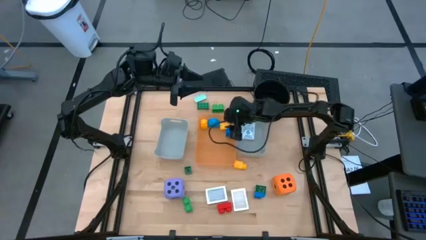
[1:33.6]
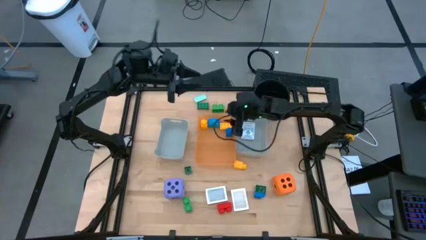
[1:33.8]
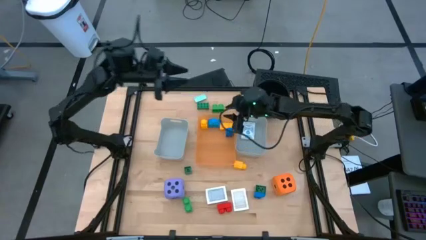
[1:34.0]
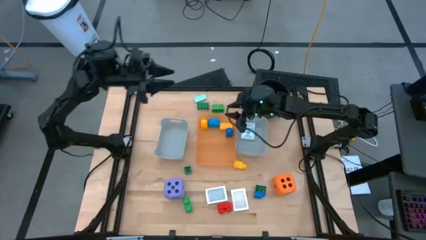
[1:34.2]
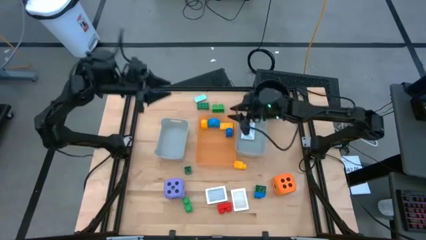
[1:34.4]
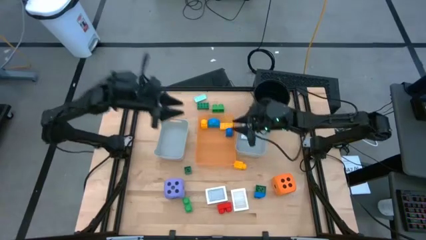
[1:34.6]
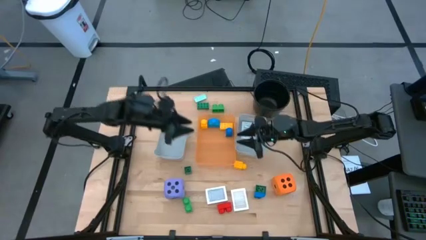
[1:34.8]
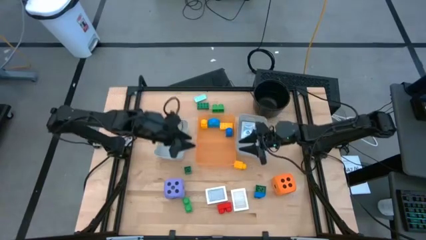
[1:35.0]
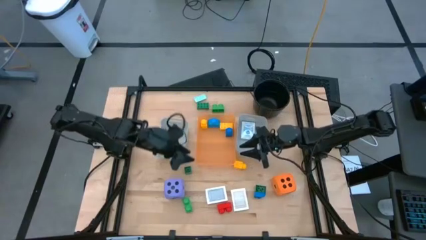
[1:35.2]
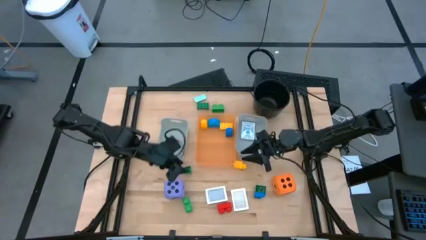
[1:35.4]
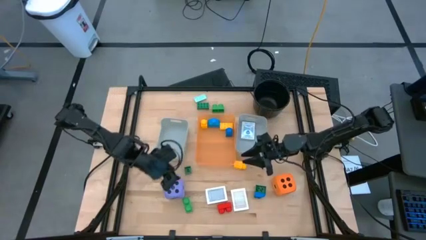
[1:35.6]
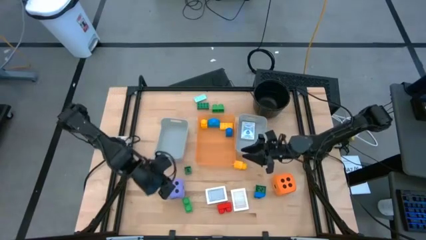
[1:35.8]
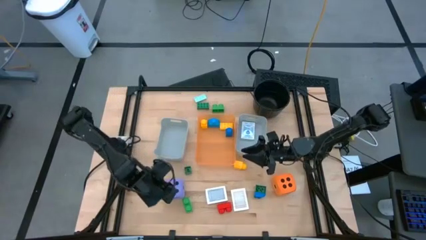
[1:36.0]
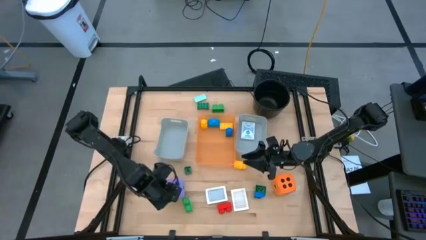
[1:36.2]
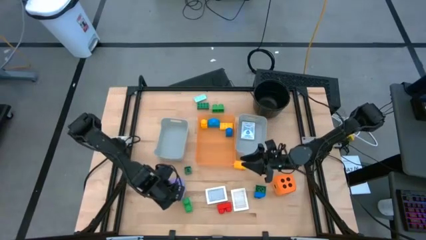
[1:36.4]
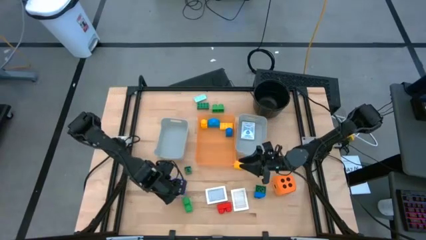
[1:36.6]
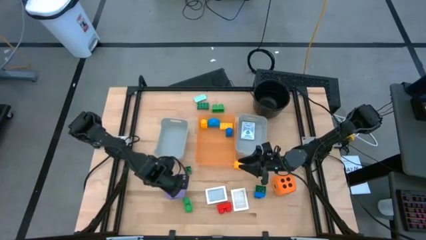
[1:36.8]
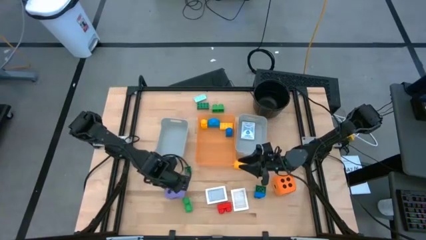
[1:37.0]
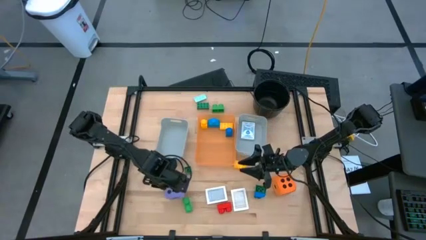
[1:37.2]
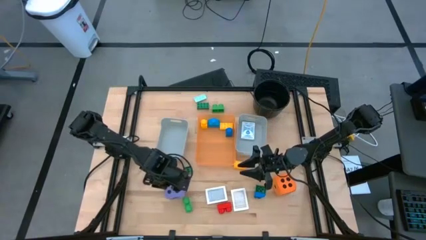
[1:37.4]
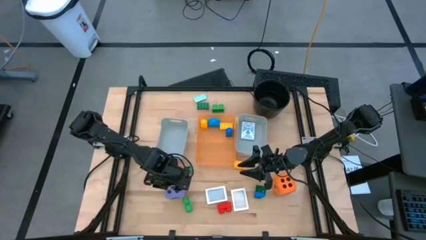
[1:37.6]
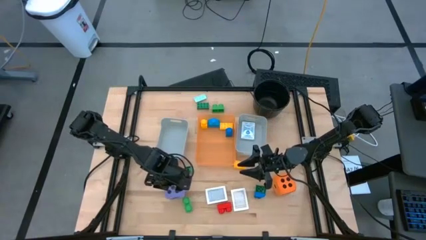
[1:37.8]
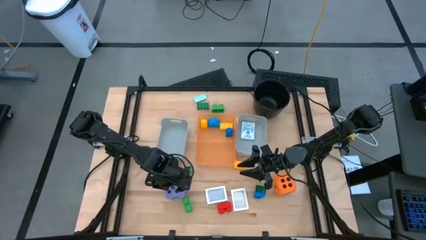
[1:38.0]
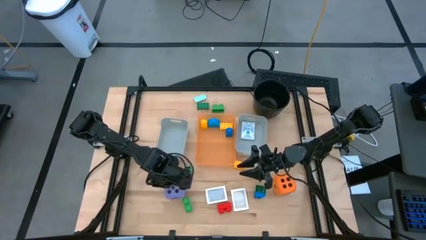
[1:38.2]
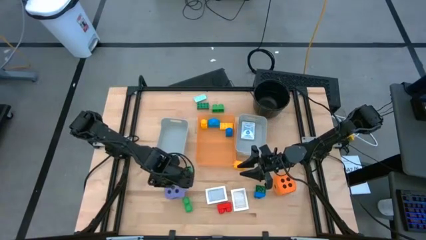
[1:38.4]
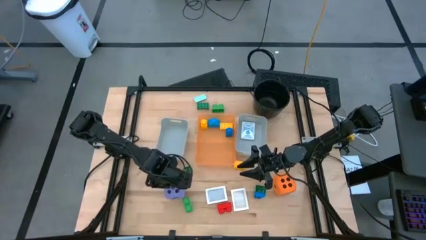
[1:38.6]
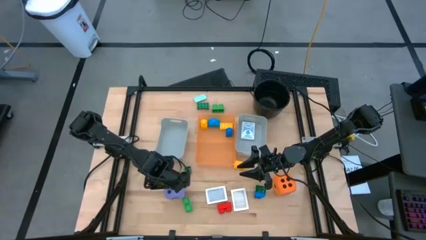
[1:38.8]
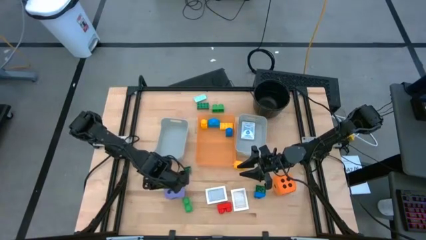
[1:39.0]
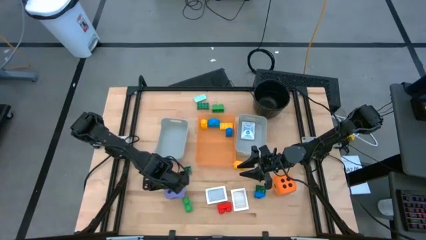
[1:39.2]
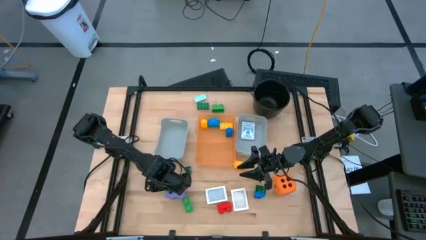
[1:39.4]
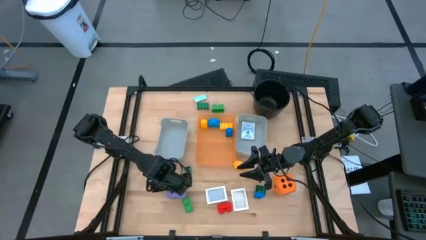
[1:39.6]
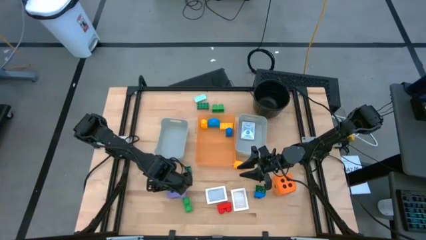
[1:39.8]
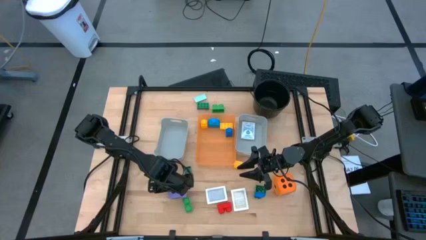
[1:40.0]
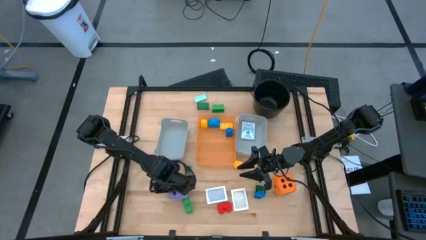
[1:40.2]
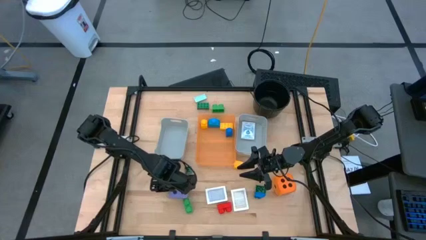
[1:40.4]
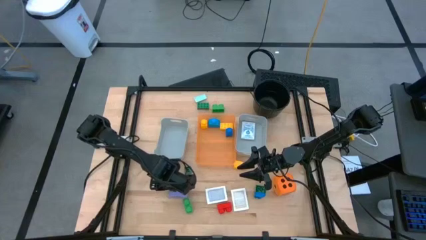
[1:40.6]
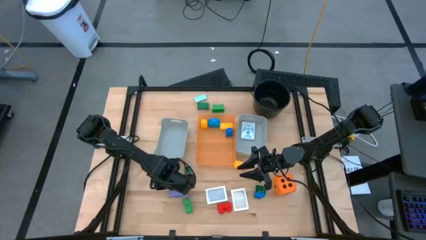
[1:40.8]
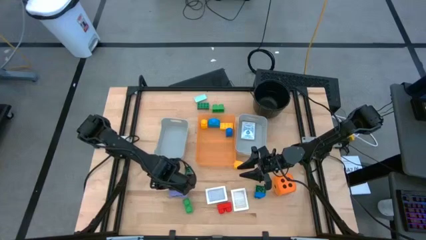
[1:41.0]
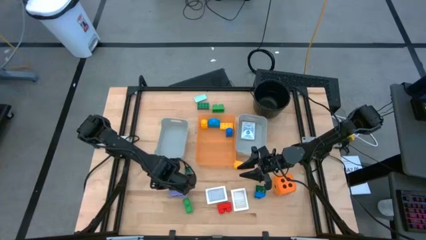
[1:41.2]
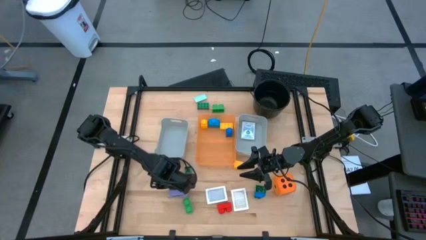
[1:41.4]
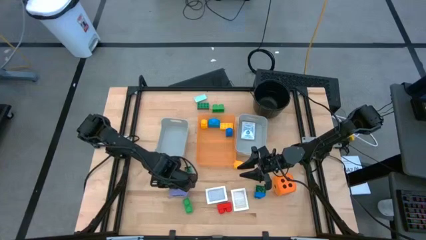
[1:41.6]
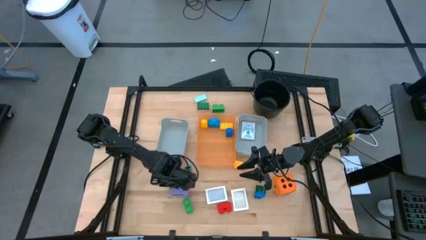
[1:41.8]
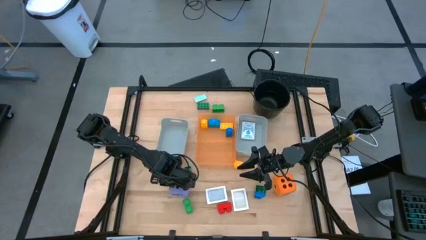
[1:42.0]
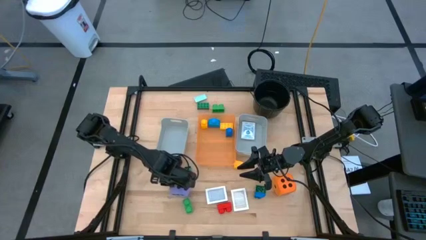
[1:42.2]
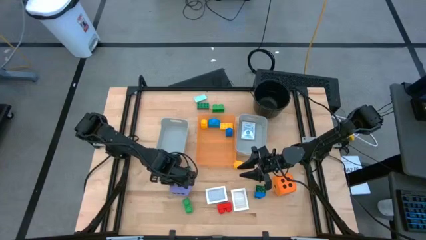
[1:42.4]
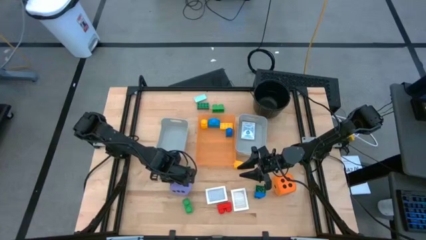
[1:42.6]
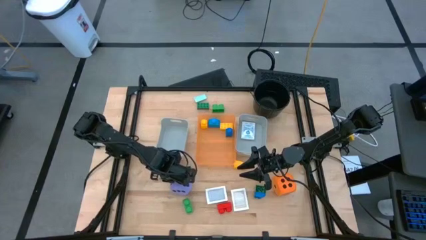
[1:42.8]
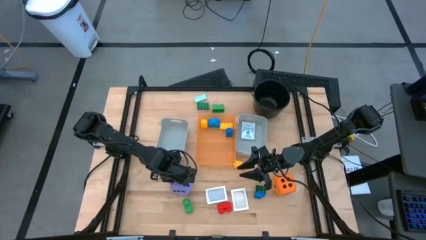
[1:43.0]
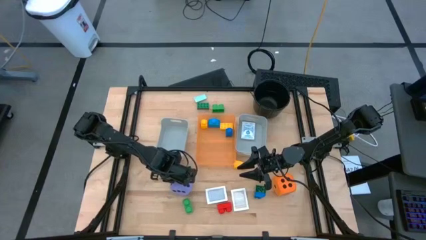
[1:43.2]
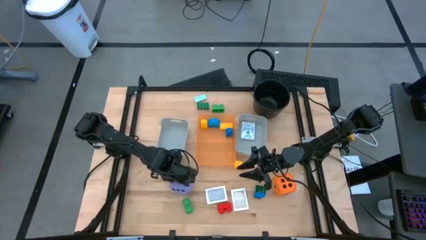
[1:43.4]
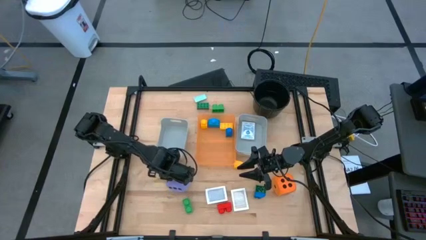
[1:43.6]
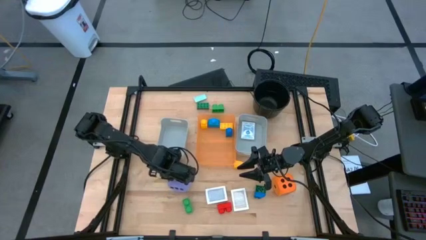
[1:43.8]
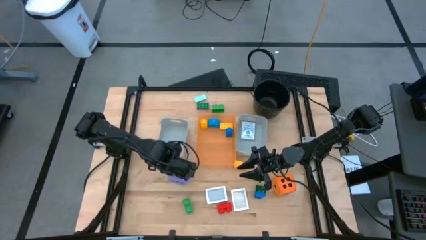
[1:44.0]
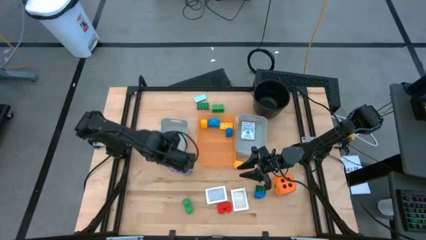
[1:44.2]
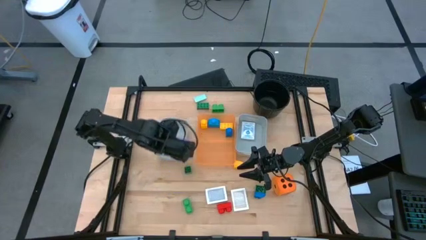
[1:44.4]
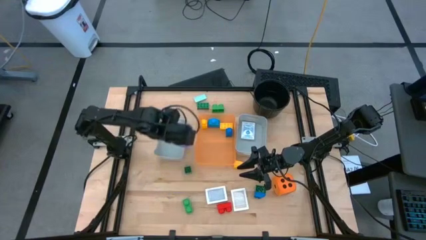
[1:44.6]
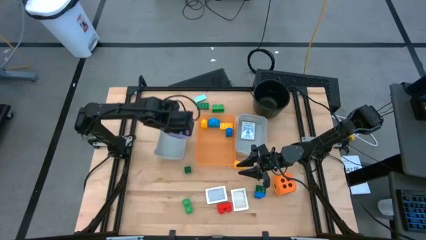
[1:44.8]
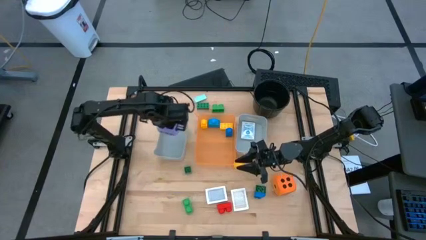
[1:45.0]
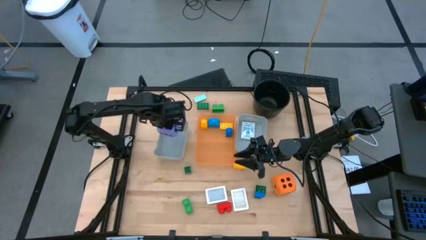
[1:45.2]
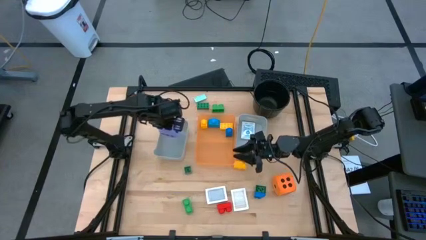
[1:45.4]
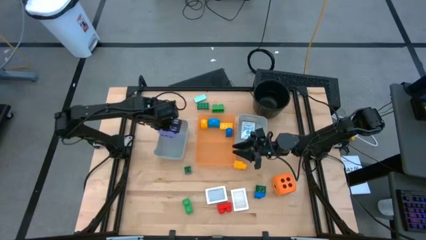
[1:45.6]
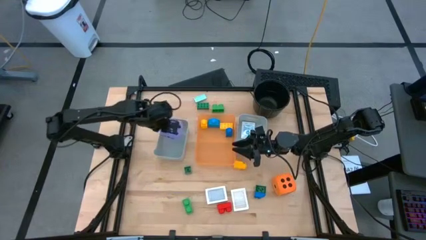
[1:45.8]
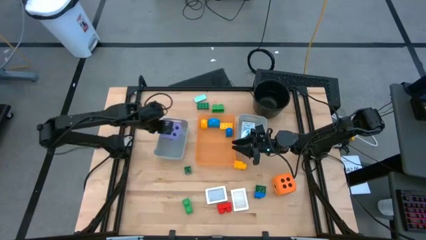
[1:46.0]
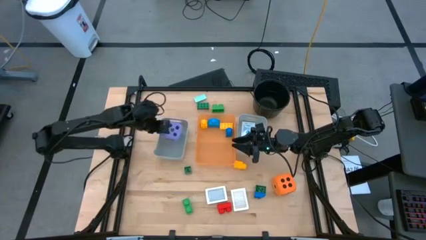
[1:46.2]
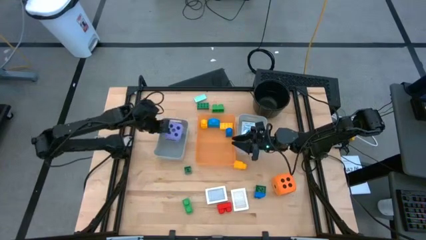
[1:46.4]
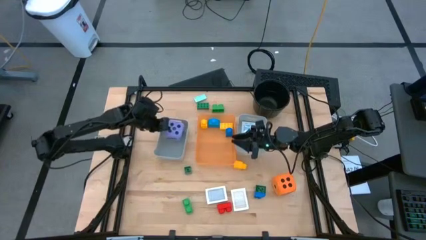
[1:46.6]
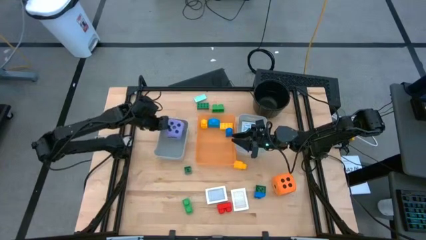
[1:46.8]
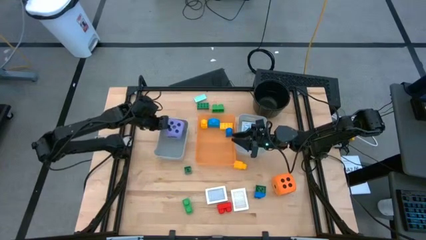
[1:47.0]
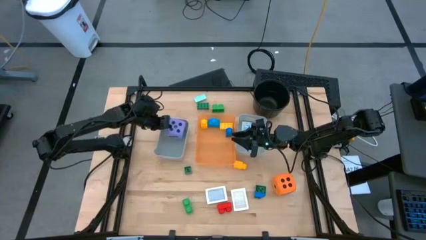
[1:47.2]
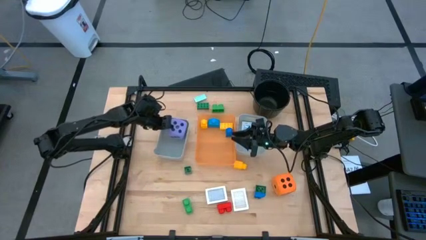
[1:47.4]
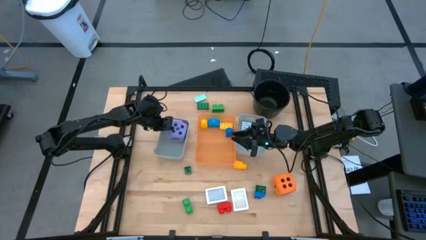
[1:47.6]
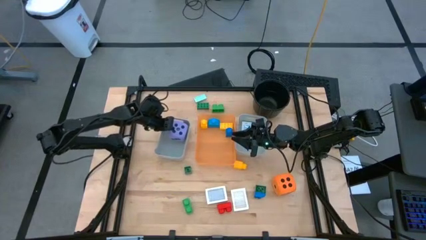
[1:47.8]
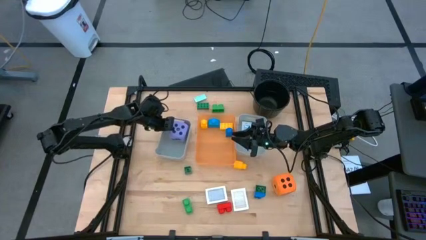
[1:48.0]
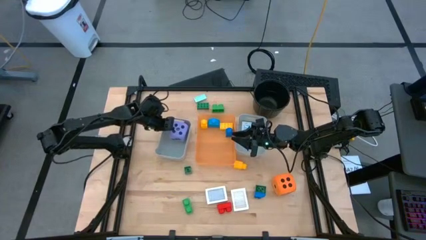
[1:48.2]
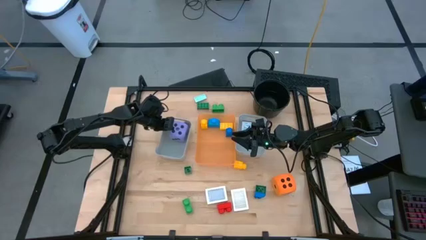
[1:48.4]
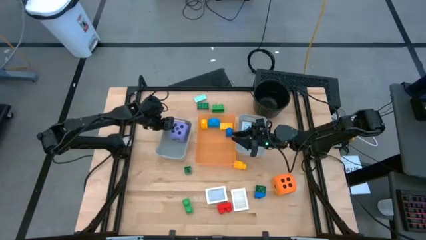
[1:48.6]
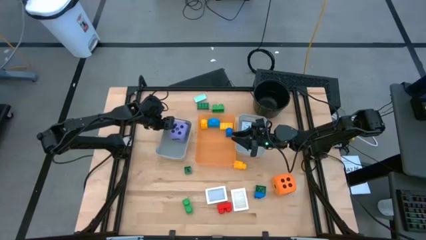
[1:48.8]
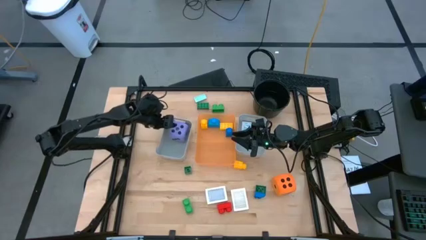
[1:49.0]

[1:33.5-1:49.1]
Task: Pick & Place Toys
Put the purple dice into the left gray bin

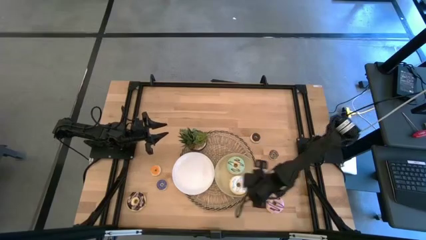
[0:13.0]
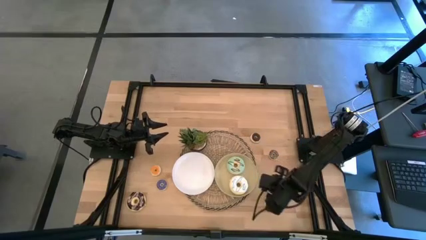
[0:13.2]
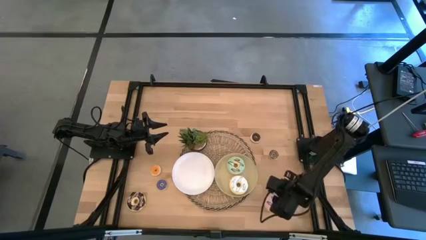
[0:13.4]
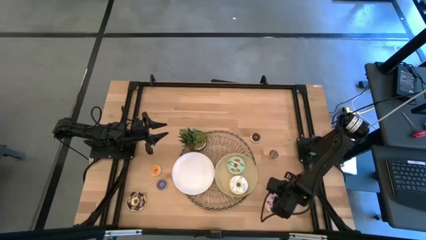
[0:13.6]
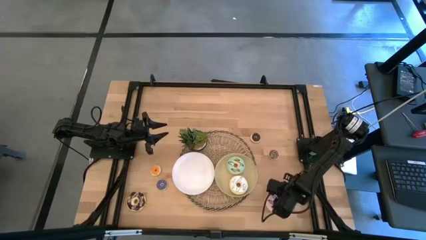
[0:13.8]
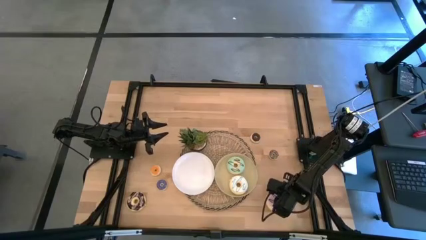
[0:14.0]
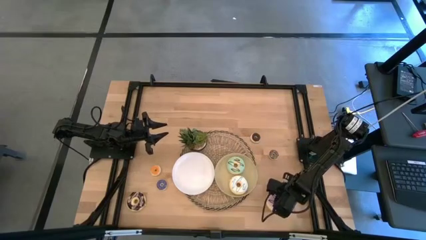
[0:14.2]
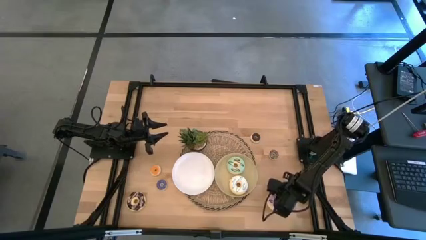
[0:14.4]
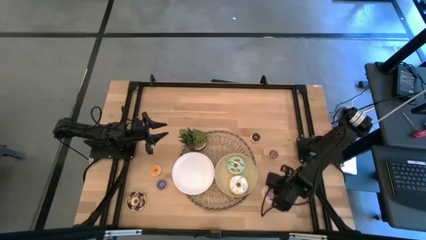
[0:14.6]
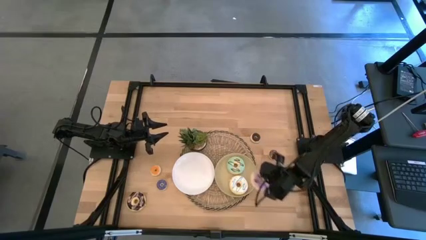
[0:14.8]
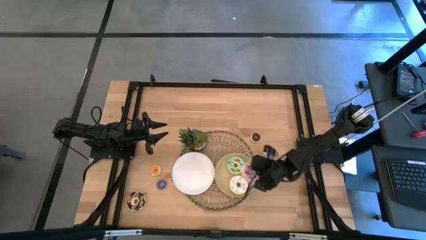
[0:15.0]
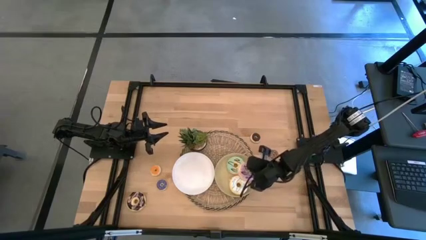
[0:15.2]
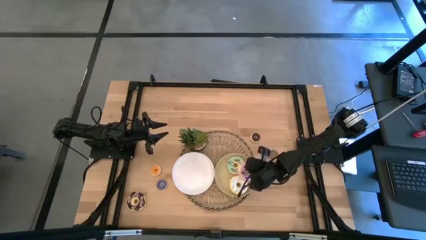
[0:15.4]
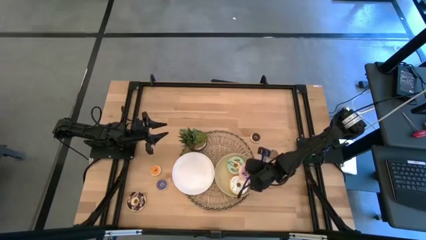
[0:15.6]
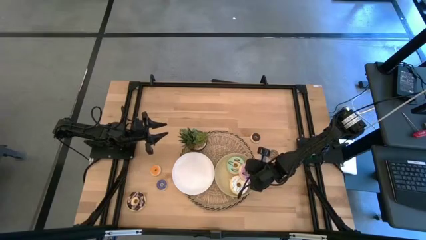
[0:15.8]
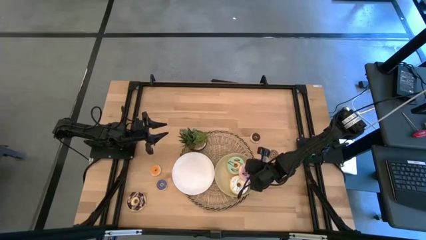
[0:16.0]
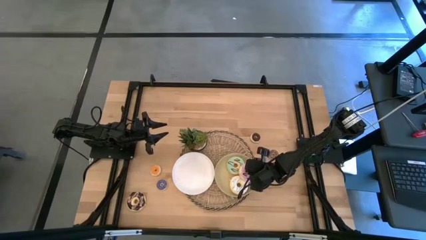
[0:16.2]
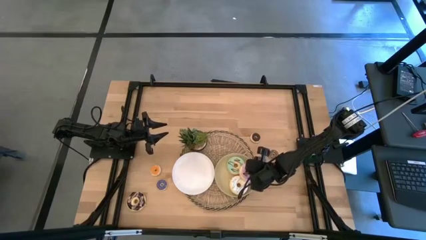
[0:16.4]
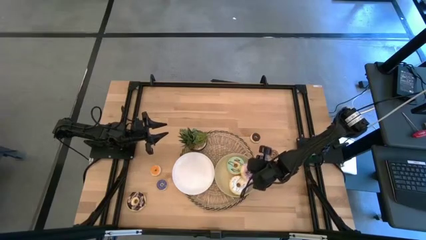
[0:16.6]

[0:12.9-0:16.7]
Task: Pick & Place donuts
Put the big purple donut on the brown plate
